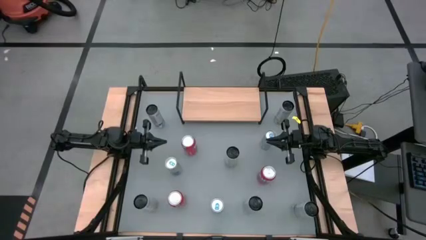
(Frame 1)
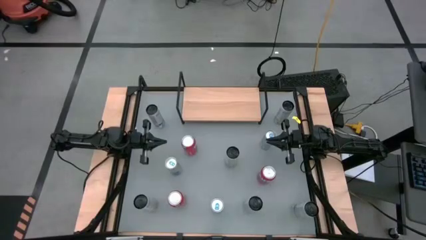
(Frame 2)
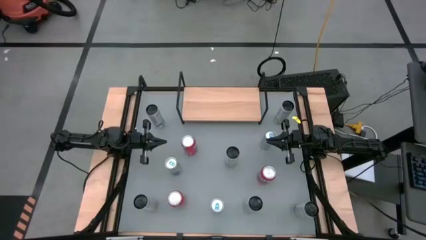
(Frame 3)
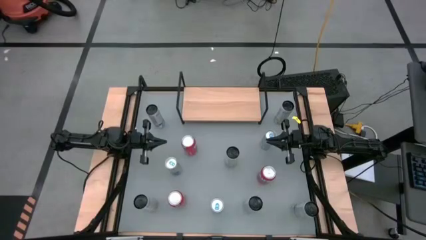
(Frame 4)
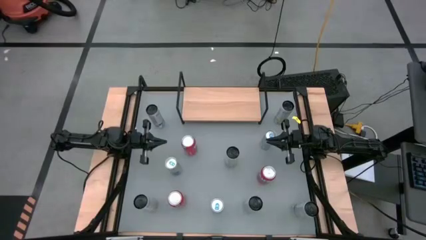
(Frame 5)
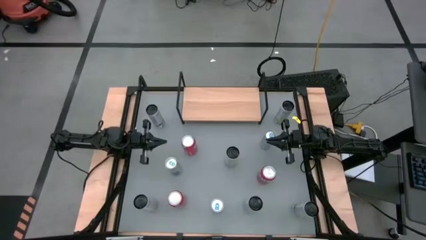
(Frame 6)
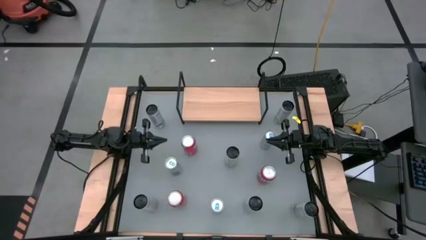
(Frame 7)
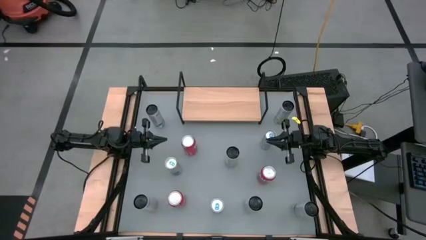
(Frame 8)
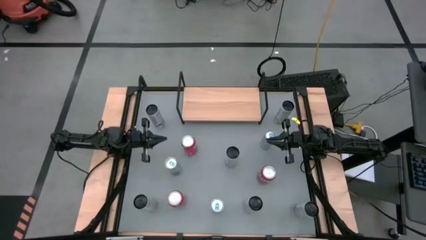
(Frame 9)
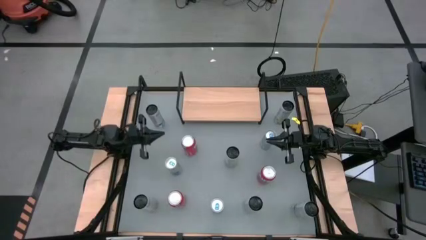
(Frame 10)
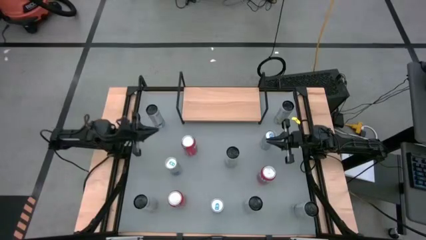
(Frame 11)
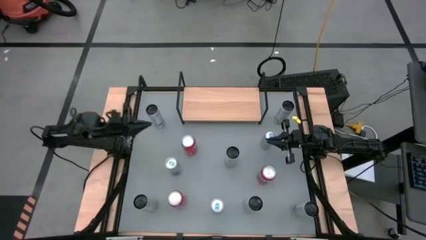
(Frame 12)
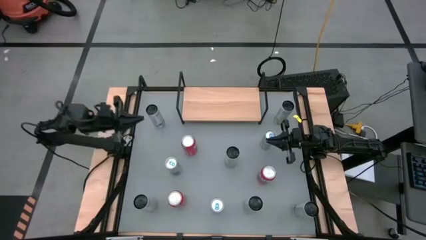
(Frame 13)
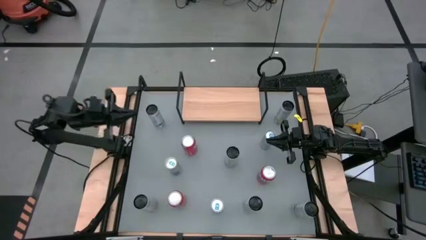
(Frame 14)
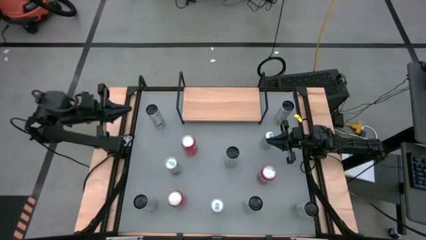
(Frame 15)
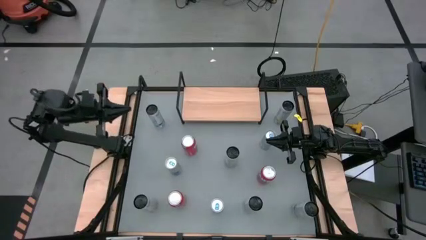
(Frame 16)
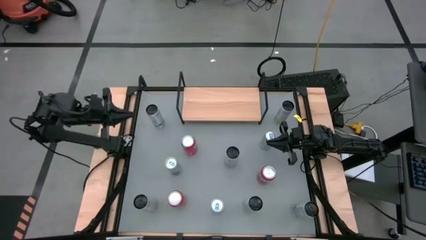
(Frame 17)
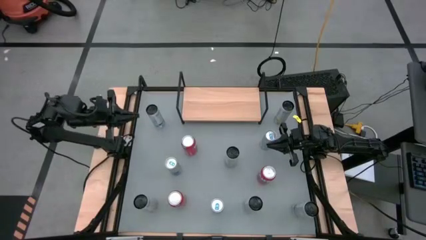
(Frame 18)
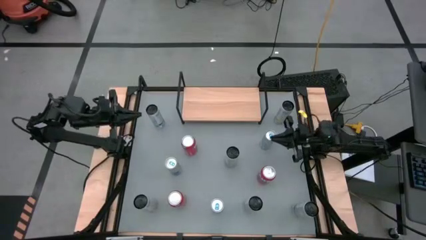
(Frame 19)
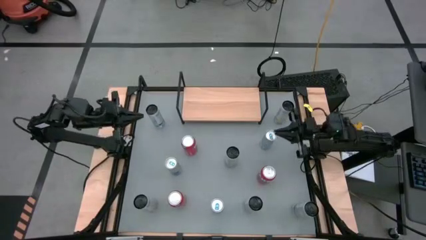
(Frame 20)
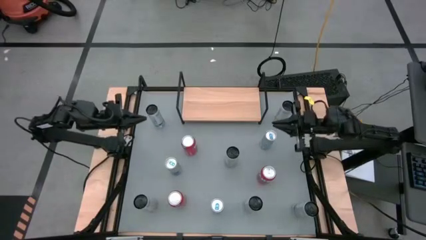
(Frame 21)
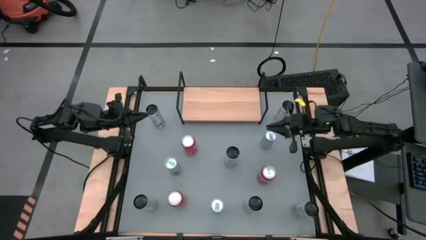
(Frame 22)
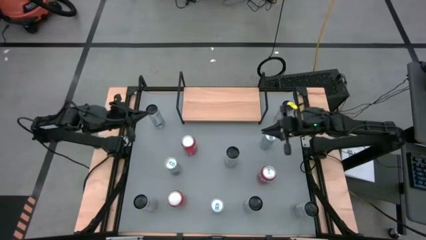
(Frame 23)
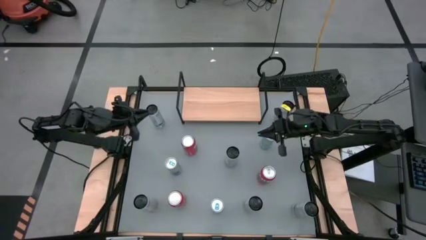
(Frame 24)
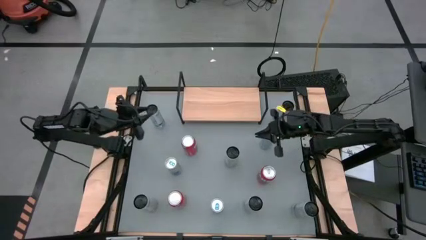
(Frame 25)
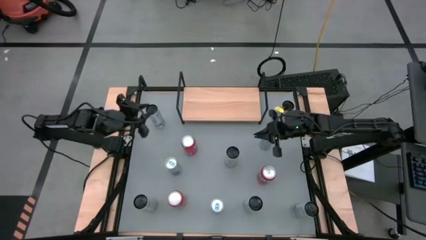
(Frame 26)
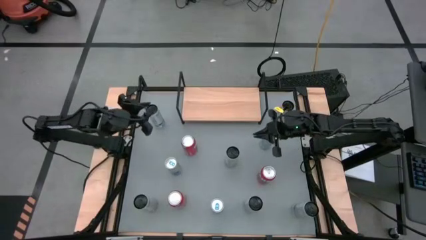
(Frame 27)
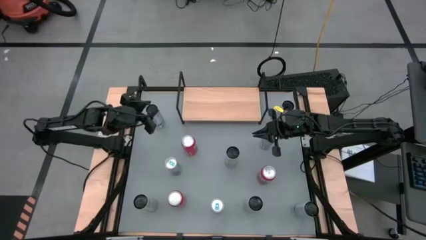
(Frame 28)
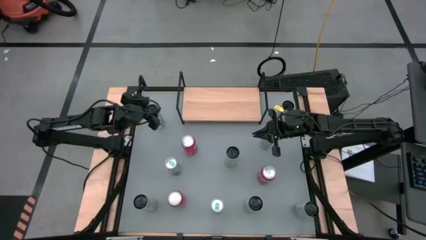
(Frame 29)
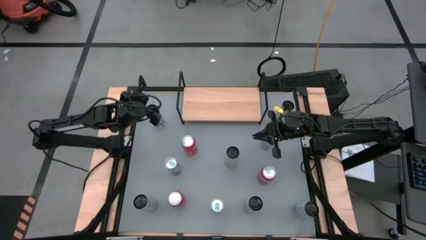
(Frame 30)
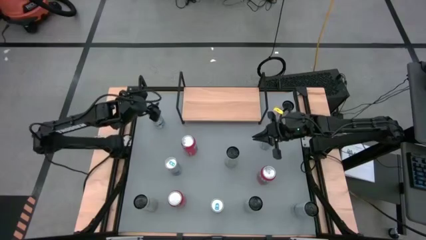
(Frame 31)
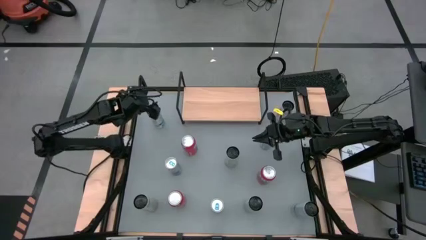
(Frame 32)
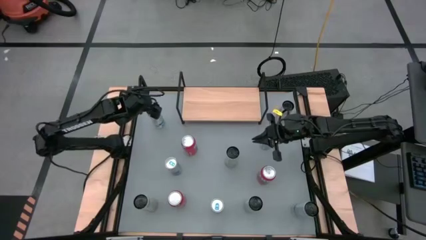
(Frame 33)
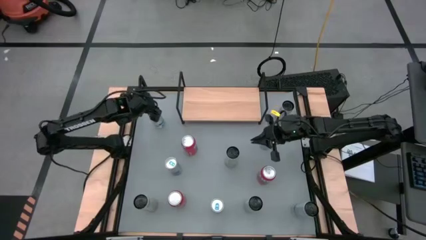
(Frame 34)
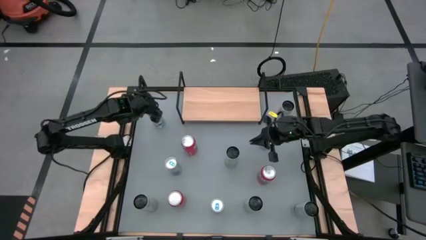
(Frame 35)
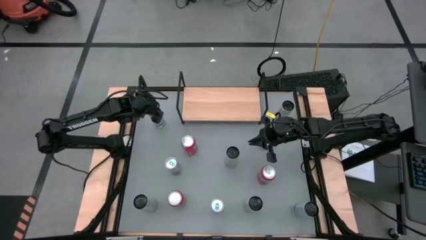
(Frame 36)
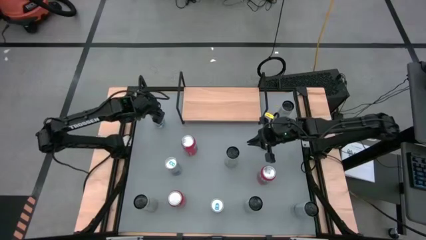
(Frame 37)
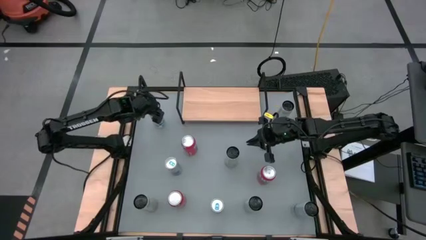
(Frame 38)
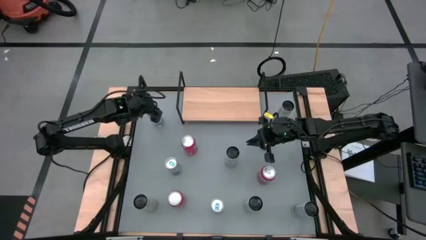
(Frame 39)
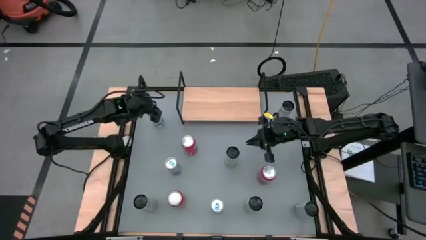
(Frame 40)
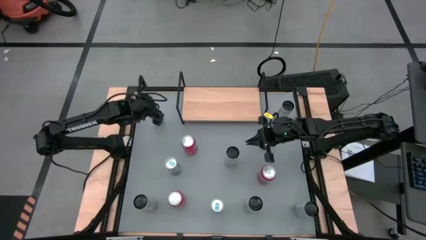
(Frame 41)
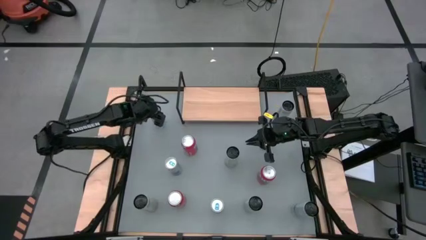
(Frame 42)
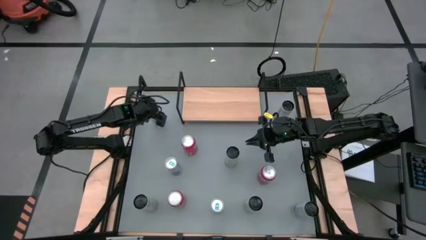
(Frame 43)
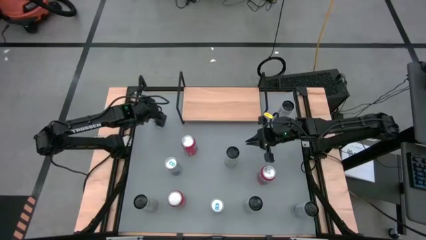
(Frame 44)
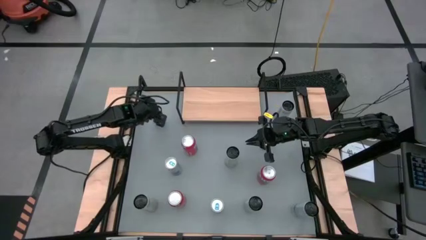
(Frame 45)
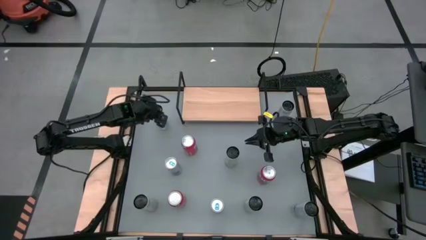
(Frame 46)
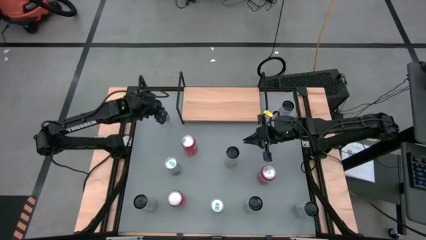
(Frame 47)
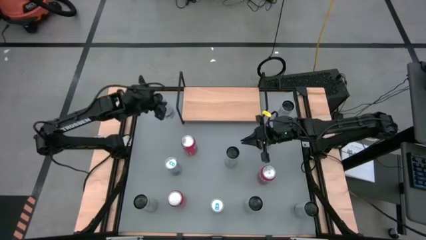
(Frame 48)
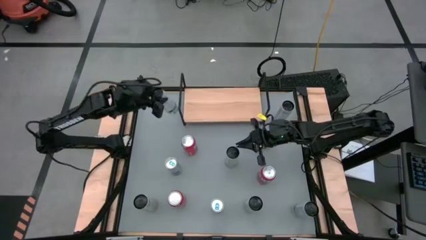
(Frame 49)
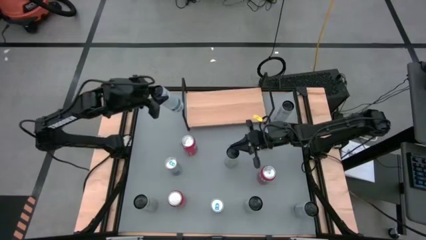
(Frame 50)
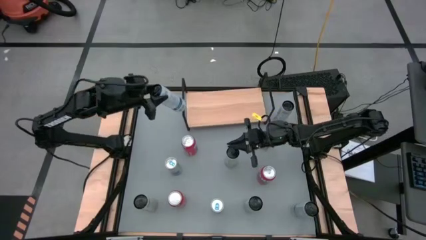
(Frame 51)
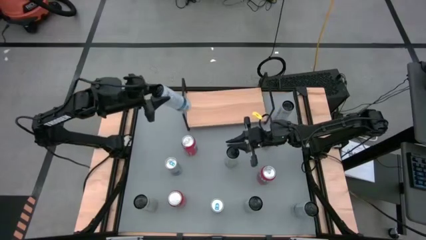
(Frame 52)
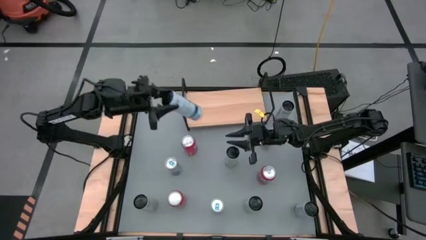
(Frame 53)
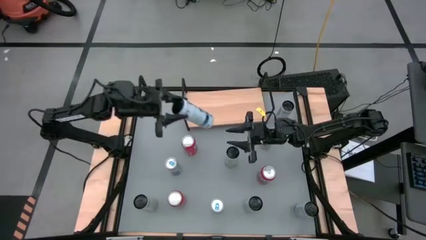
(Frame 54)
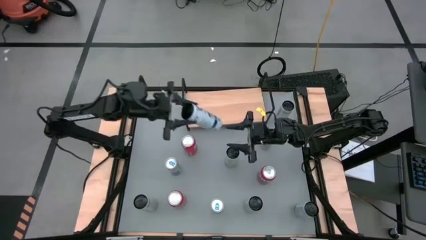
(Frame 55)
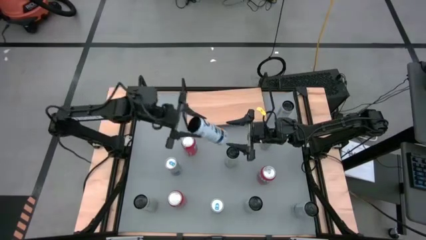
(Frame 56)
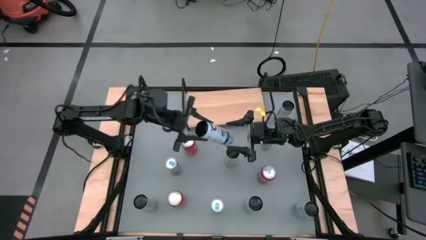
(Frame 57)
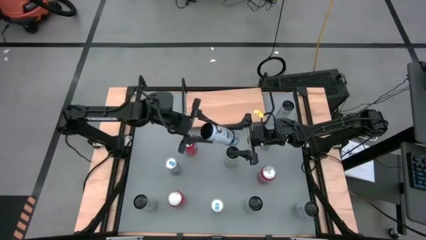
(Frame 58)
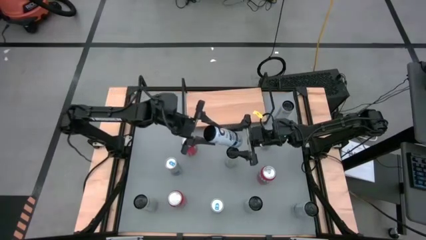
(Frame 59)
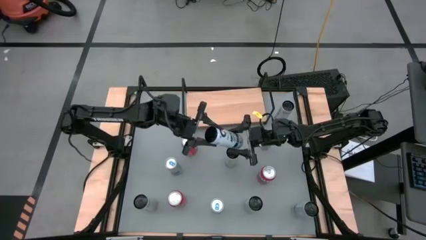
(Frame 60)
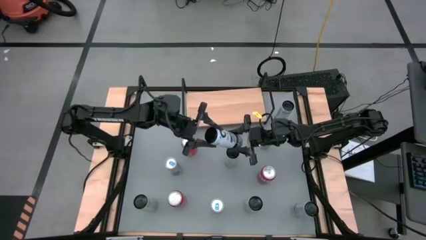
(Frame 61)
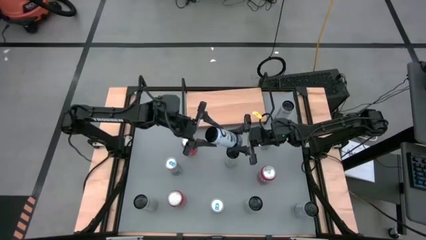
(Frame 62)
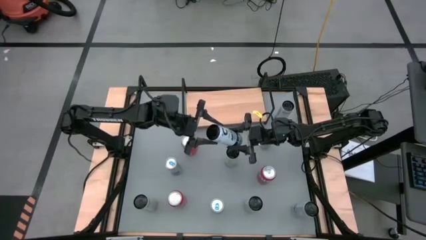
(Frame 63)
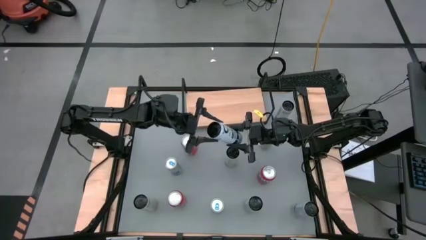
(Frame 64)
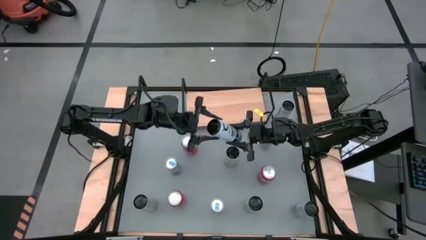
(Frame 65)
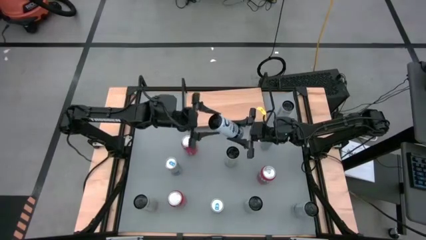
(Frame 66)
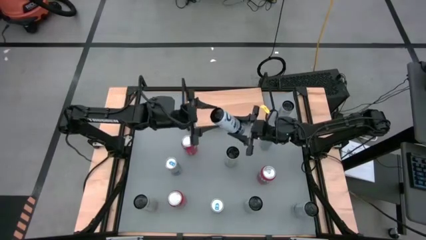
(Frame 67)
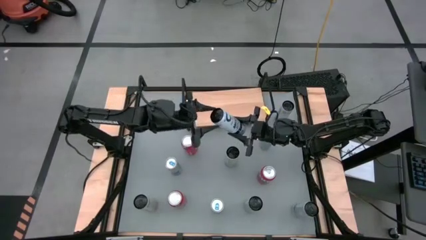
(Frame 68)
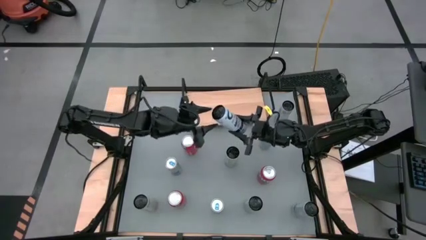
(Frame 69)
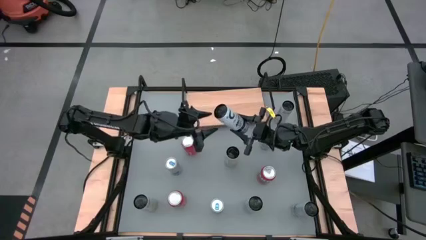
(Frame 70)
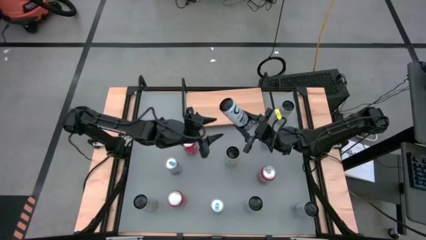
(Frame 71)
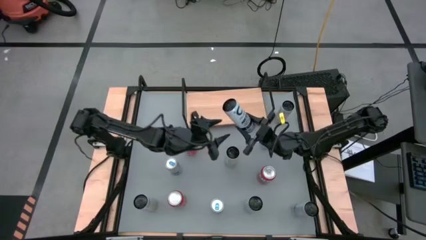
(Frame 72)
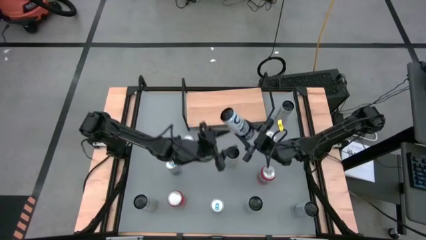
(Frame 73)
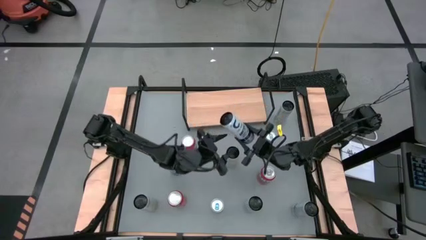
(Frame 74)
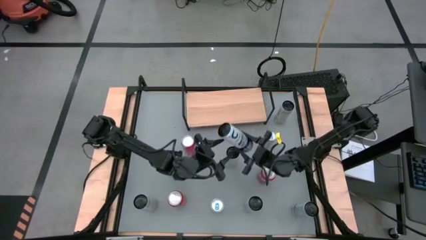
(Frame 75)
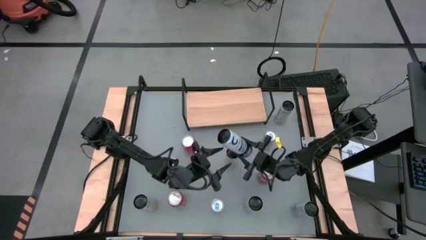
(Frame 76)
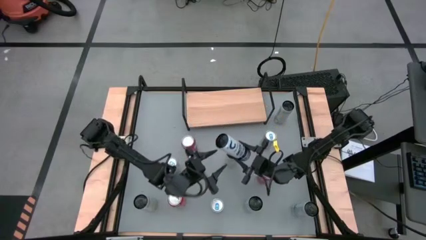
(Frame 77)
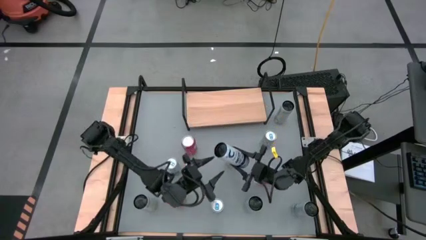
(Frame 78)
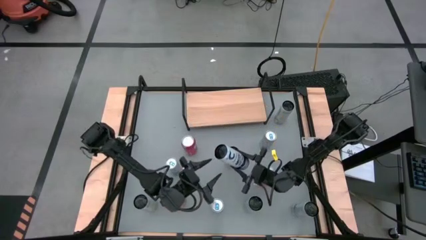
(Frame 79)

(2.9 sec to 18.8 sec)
Task: Place canned beverage on shelf
Put the top left white blue soda can on the shelf
